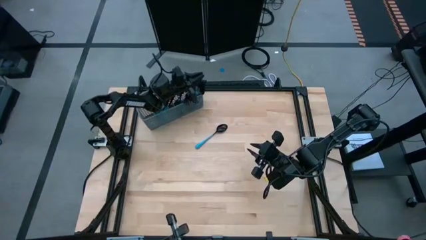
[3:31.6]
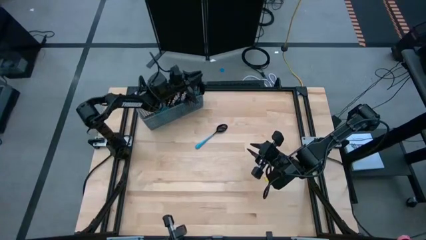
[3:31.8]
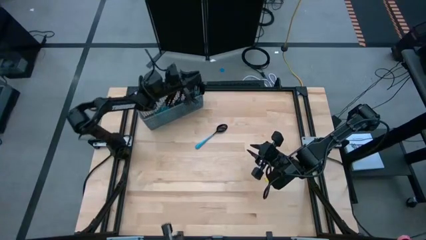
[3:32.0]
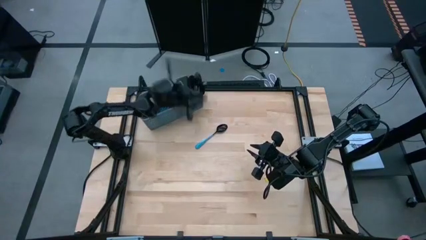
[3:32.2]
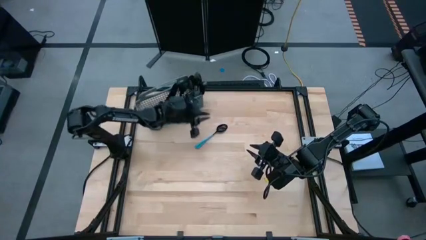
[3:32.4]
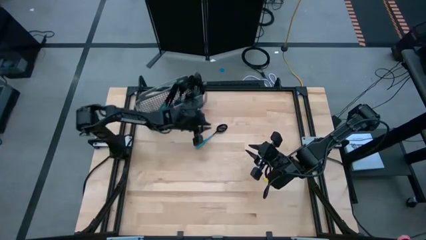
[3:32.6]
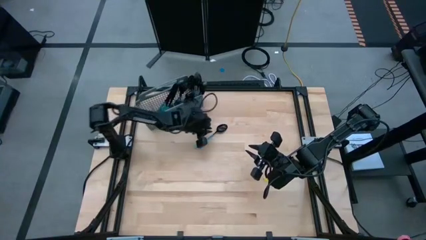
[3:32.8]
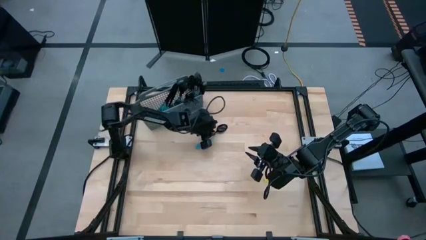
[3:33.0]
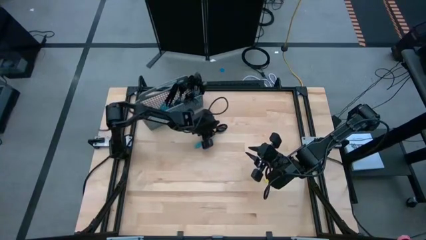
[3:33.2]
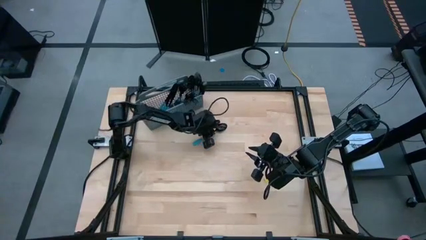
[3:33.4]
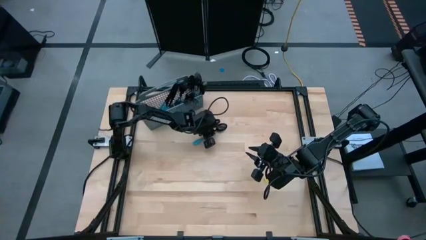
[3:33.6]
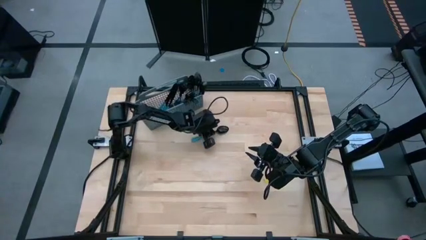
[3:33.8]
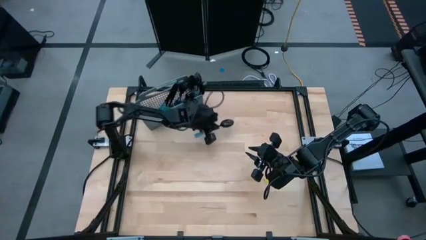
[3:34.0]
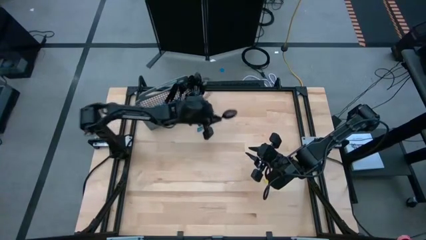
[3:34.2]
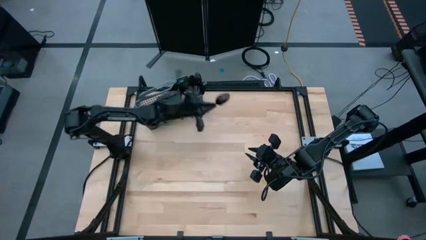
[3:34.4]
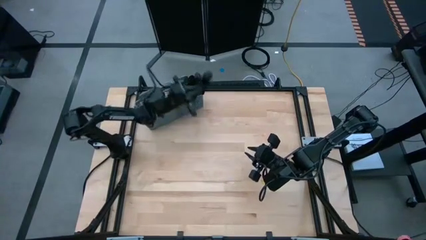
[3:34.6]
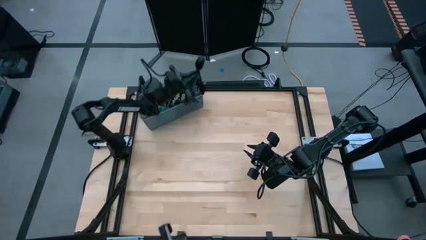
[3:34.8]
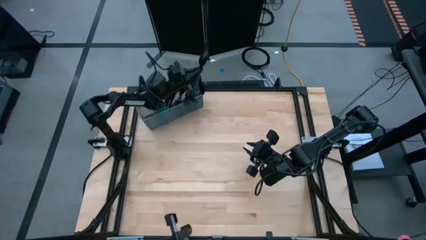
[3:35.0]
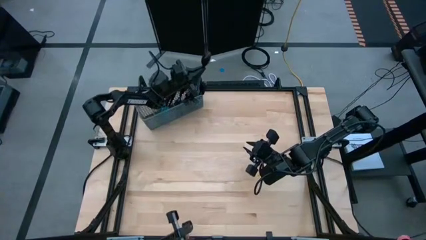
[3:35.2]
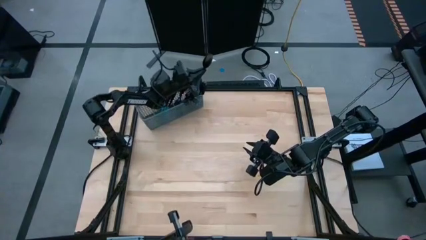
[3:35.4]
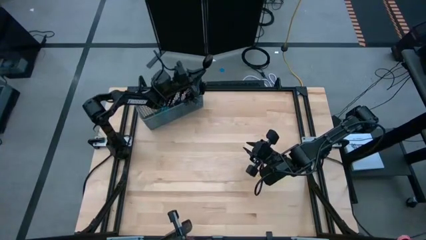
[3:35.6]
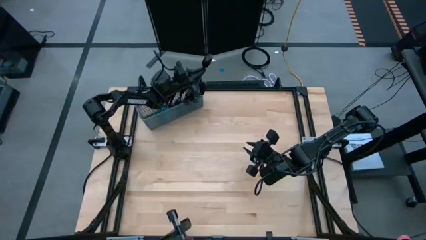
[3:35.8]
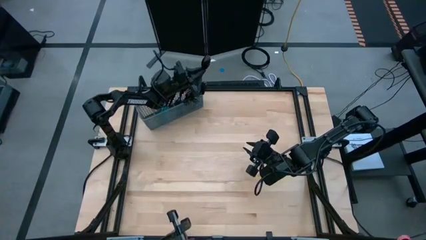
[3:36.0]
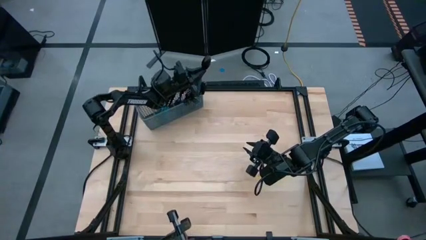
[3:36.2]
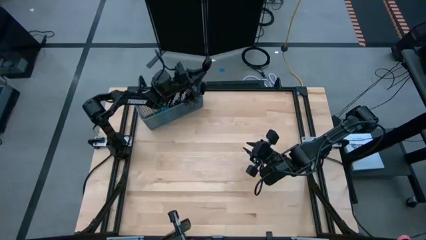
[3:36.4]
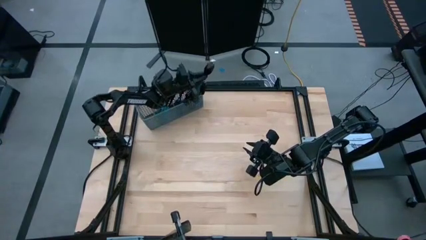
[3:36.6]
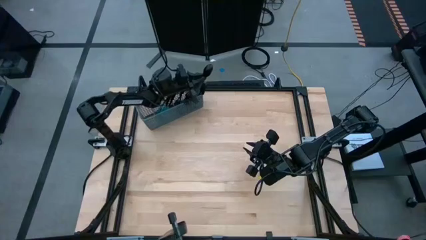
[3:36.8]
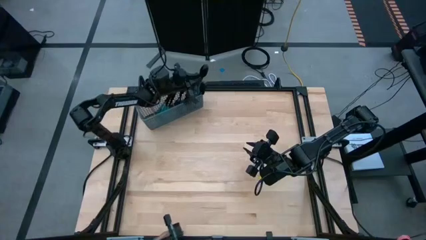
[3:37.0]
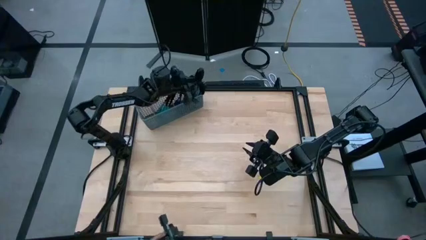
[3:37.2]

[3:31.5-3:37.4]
Task: Sort silverware
Put the blue spoon in the silverware rack

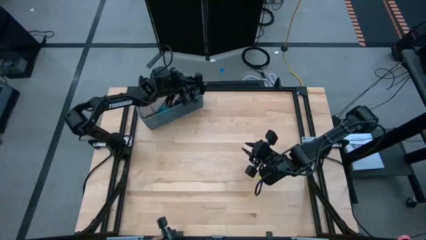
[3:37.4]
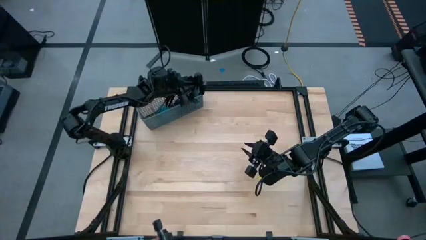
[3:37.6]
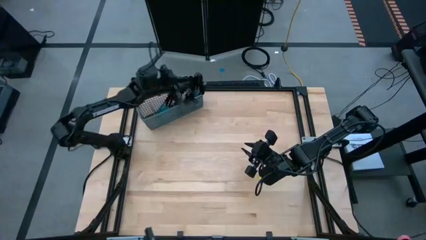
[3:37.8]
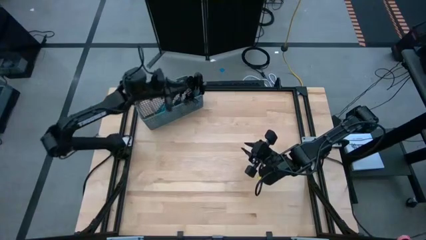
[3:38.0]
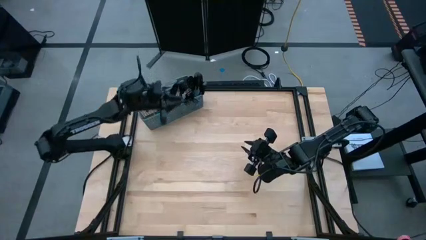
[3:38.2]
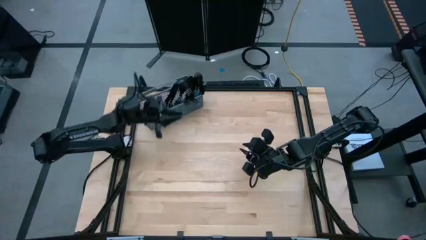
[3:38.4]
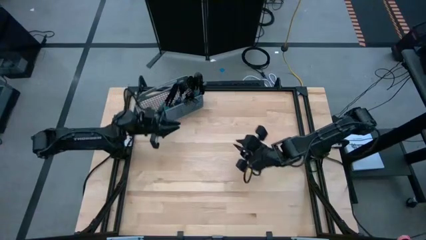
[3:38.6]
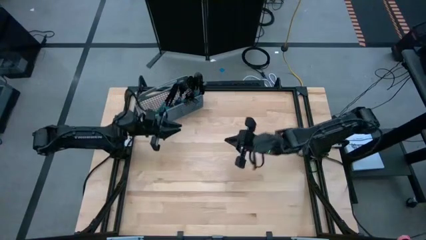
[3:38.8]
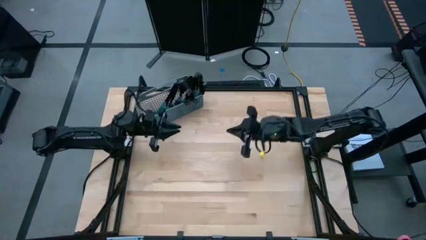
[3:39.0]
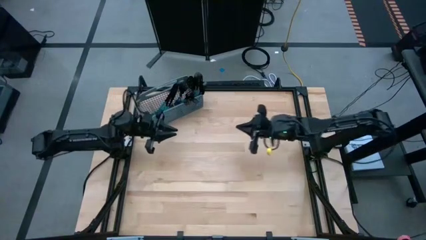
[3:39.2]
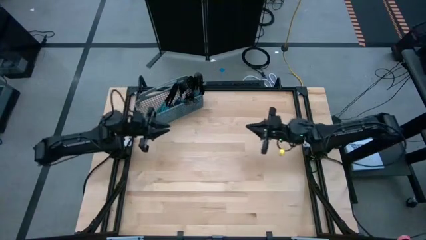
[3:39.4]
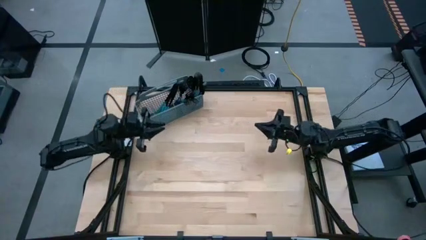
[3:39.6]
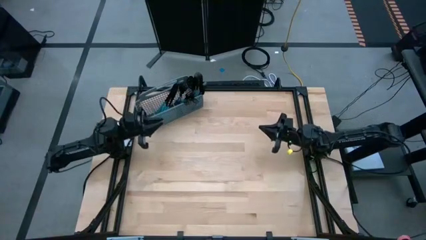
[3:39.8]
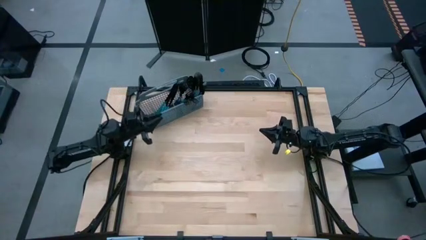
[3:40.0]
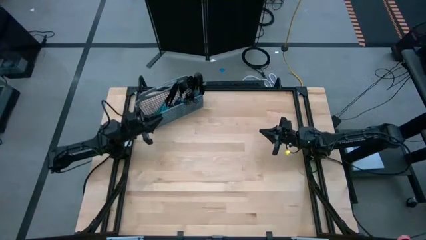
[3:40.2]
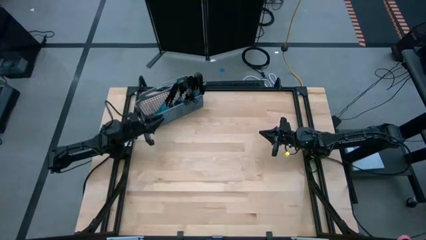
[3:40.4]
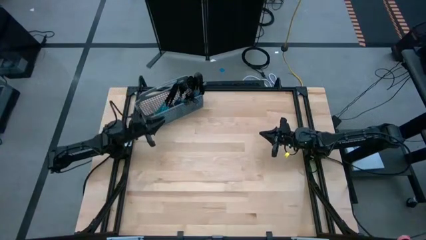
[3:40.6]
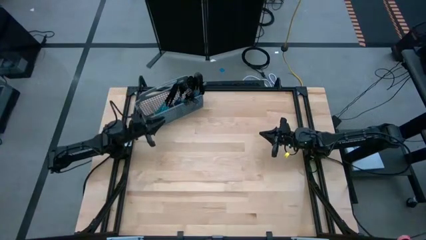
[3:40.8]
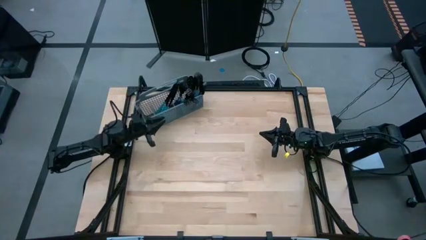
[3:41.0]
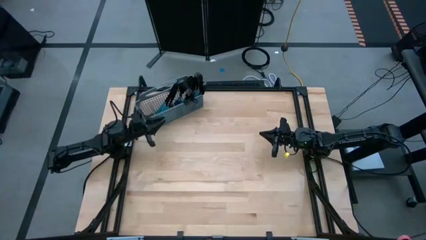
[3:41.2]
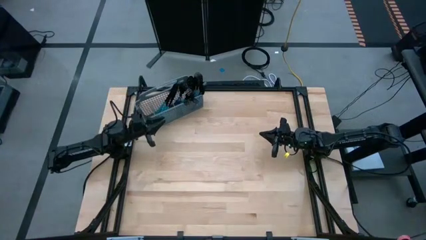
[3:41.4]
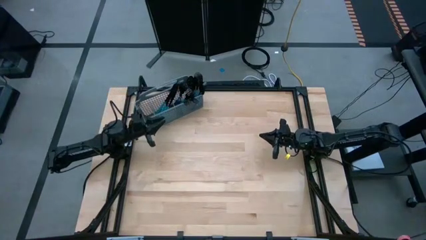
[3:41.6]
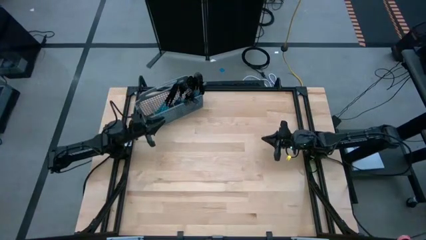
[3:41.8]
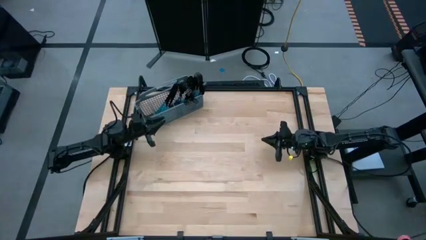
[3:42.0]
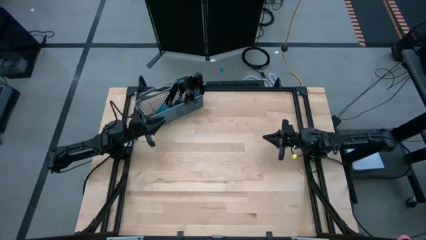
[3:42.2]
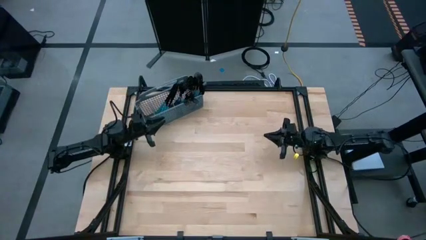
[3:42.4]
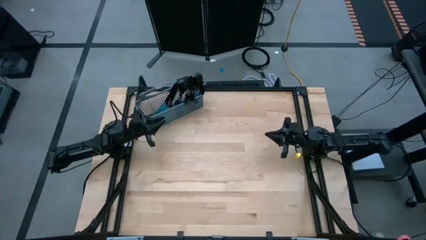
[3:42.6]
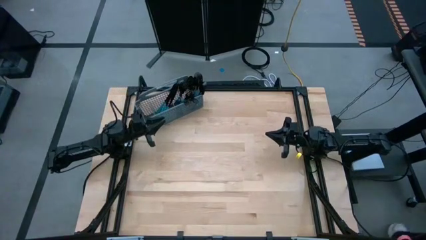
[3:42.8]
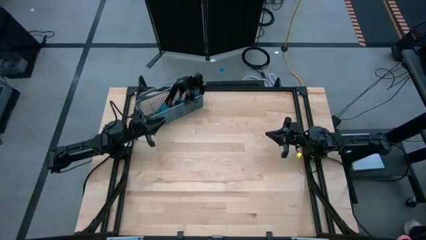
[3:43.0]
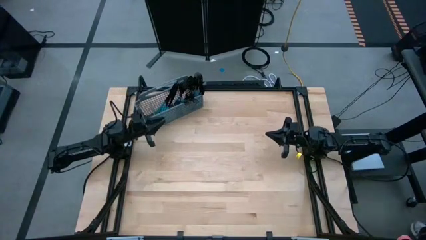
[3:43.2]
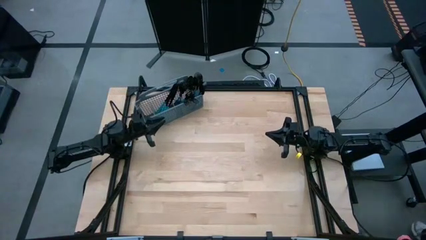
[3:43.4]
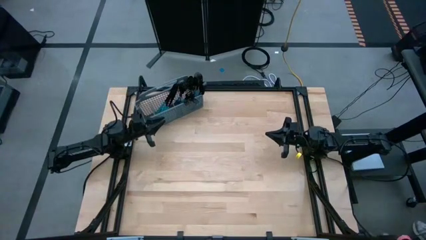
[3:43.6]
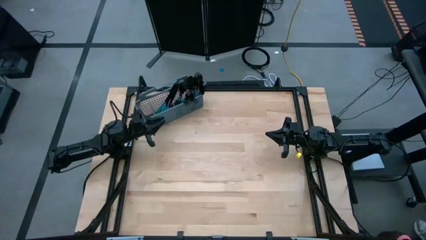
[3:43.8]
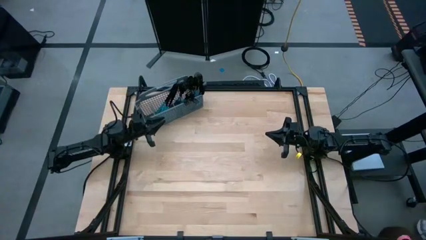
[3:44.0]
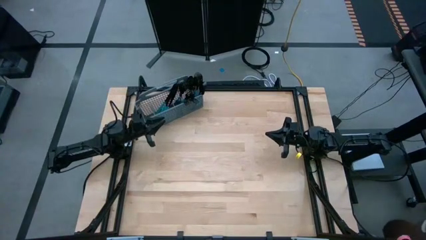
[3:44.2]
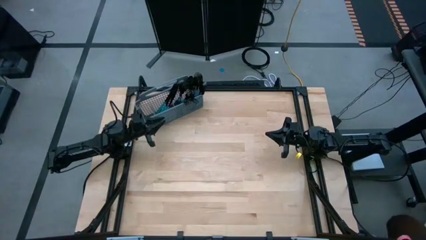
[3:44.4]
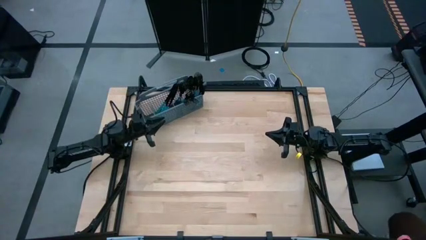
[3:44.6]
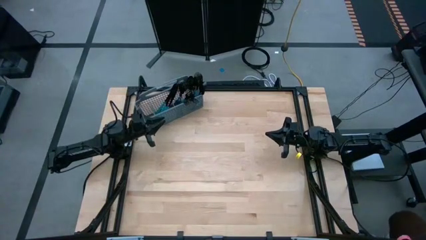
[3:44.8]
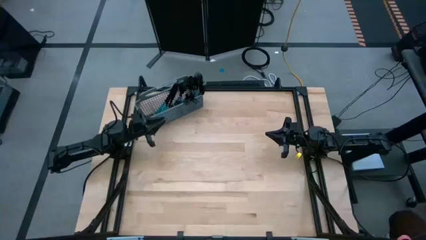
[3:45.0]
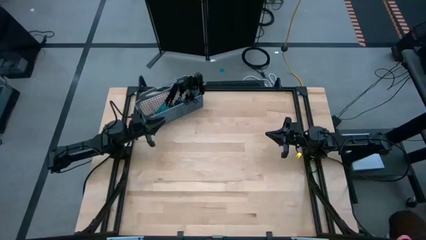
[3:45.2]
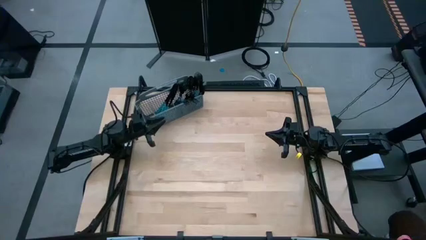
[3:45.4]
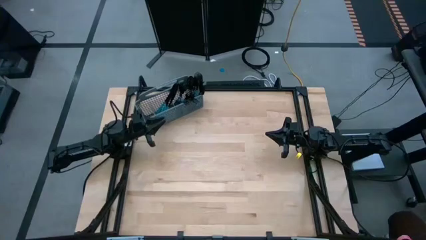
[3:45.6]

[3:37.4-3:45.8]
Return to Home Position
